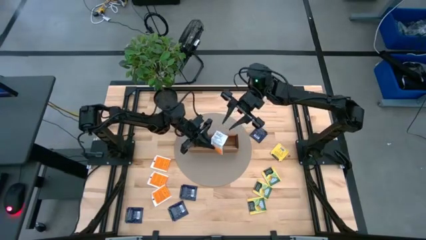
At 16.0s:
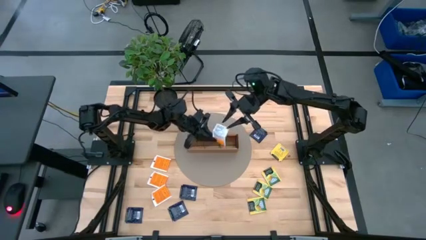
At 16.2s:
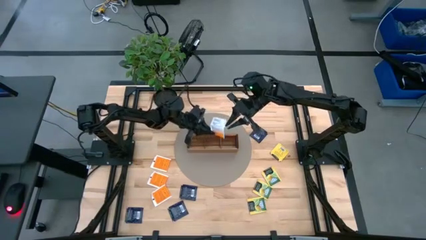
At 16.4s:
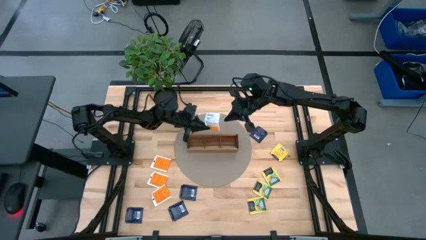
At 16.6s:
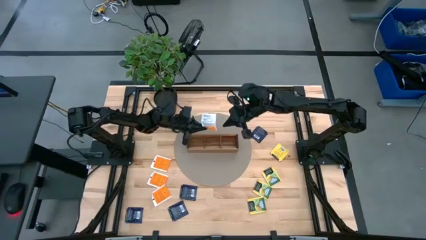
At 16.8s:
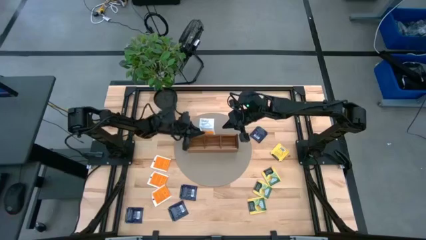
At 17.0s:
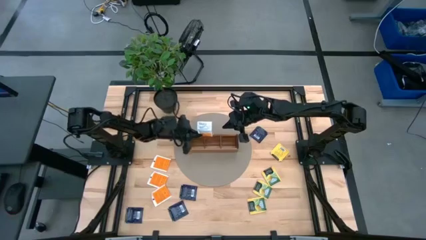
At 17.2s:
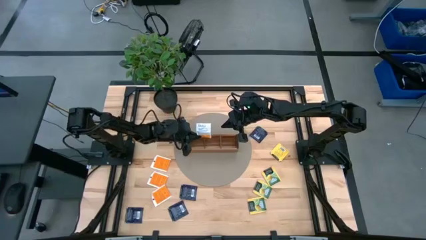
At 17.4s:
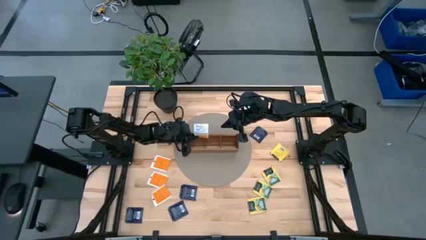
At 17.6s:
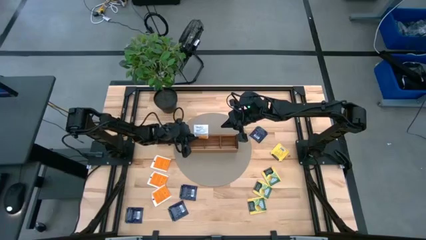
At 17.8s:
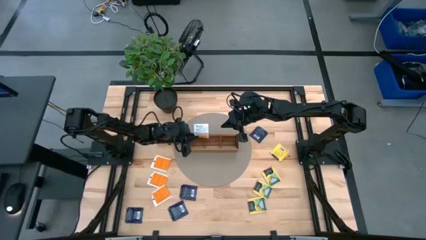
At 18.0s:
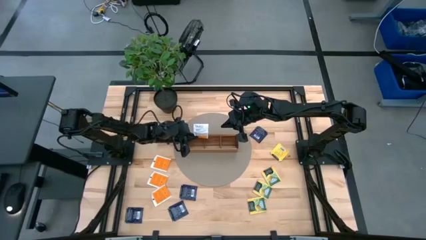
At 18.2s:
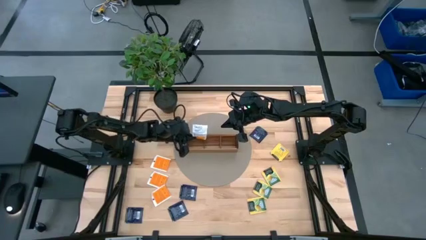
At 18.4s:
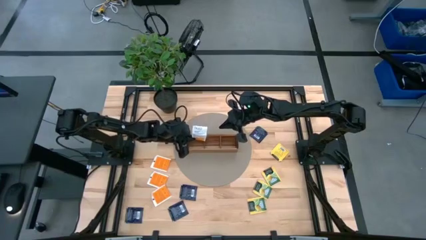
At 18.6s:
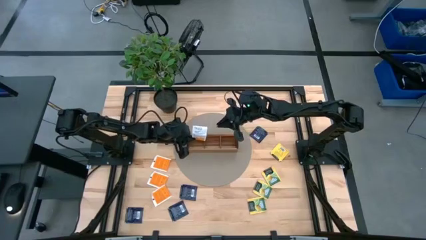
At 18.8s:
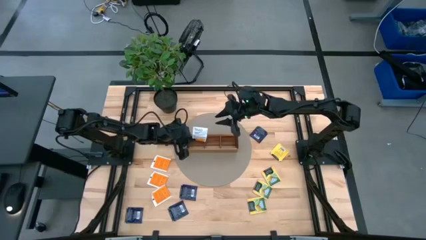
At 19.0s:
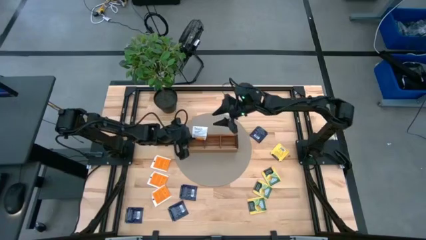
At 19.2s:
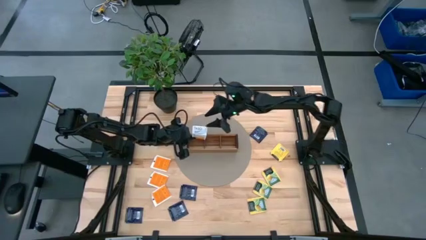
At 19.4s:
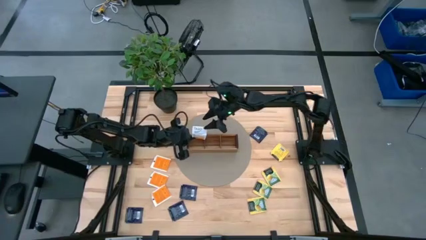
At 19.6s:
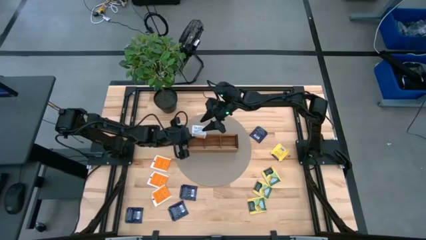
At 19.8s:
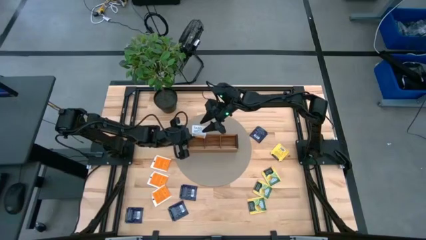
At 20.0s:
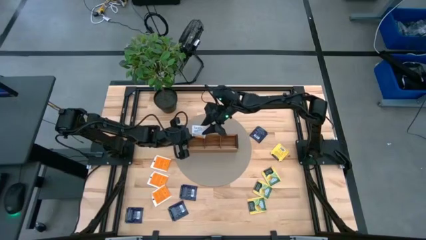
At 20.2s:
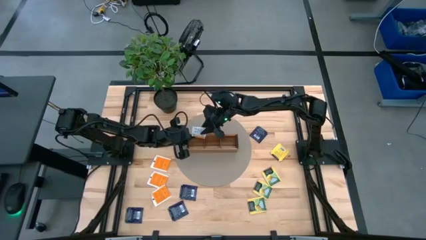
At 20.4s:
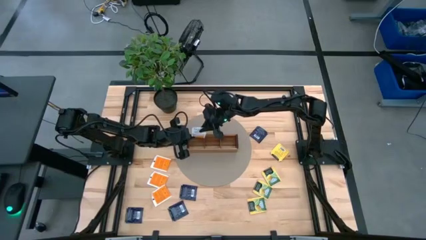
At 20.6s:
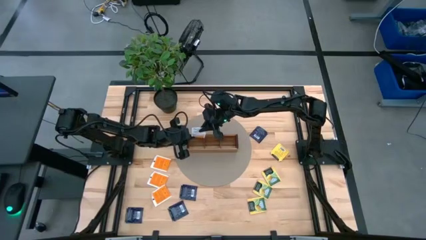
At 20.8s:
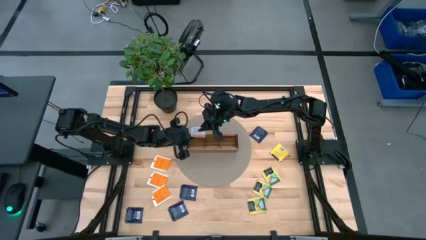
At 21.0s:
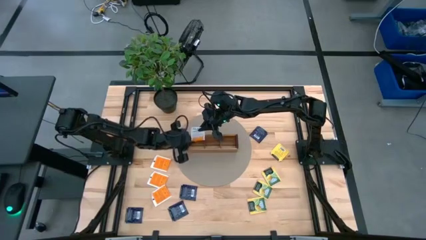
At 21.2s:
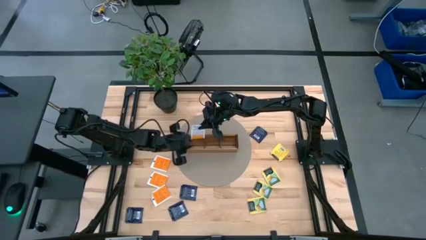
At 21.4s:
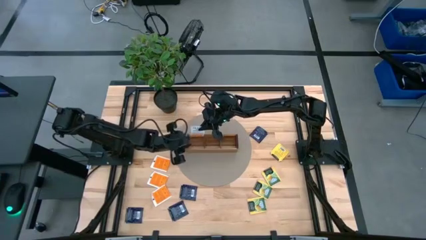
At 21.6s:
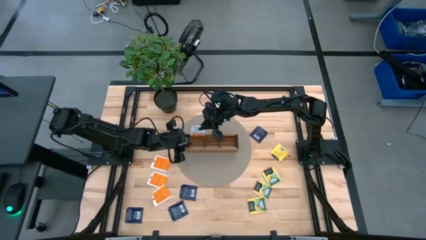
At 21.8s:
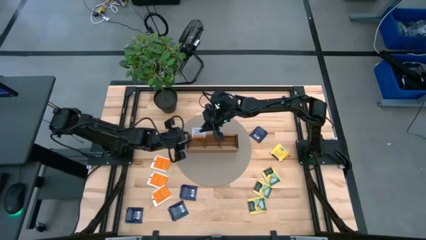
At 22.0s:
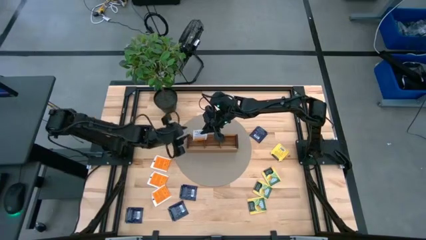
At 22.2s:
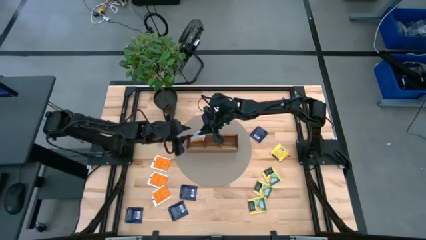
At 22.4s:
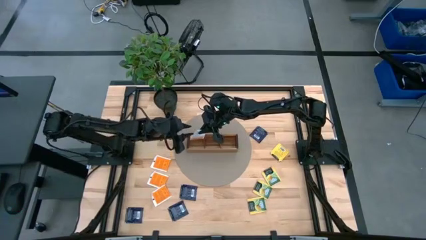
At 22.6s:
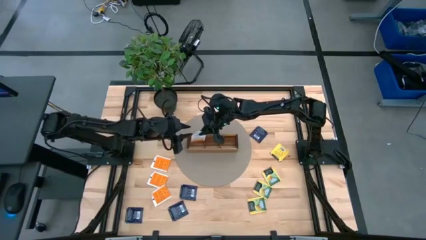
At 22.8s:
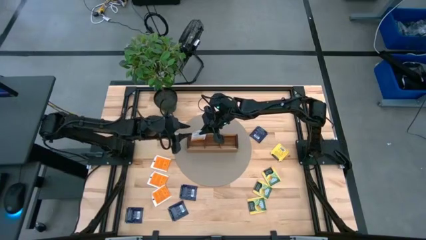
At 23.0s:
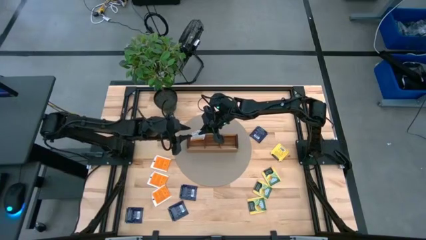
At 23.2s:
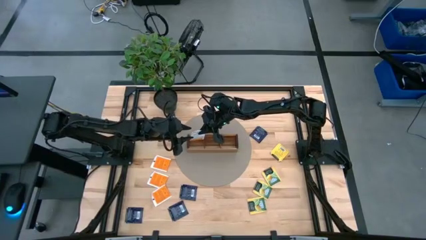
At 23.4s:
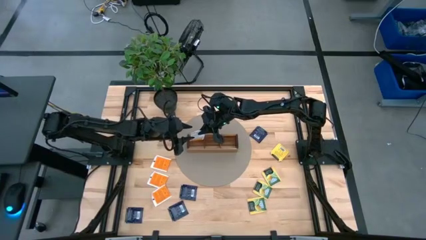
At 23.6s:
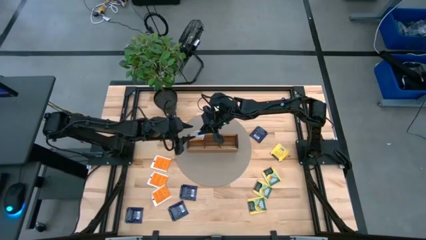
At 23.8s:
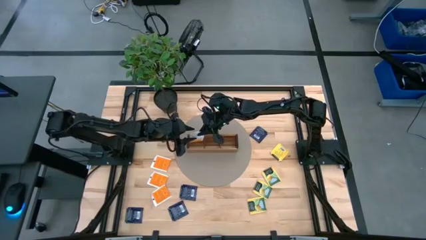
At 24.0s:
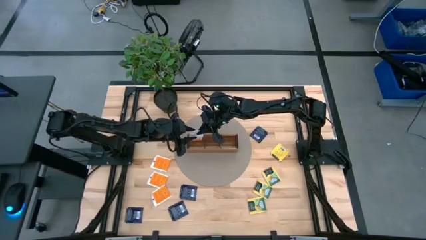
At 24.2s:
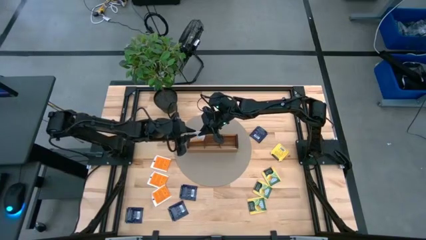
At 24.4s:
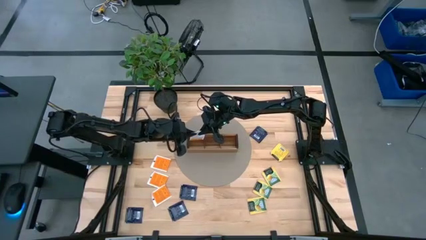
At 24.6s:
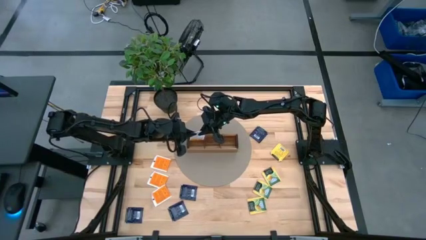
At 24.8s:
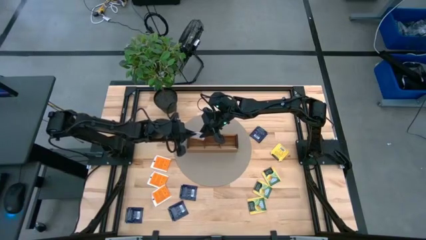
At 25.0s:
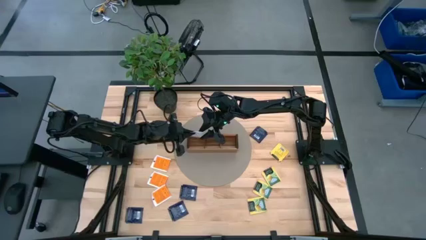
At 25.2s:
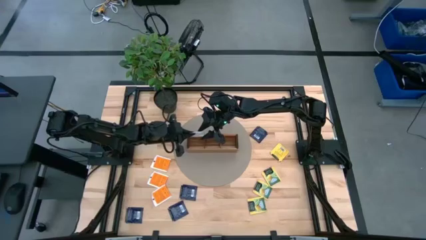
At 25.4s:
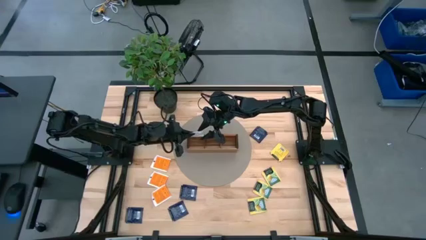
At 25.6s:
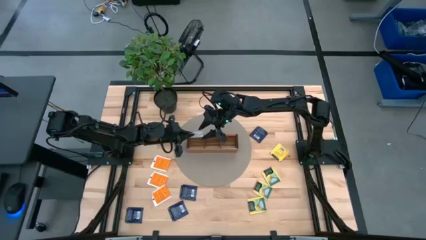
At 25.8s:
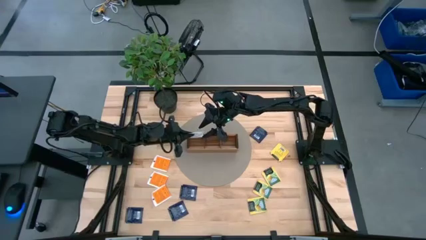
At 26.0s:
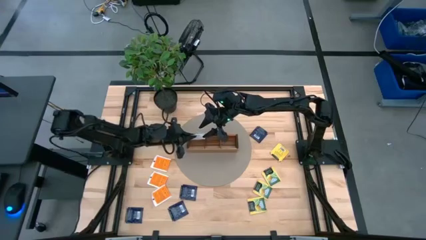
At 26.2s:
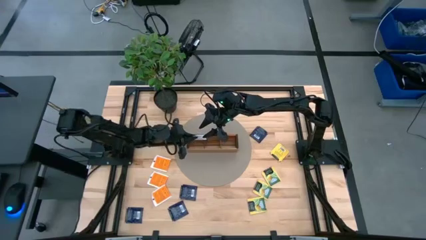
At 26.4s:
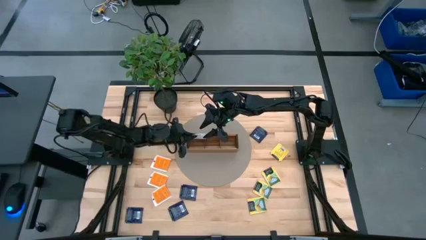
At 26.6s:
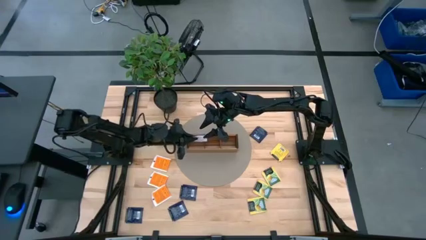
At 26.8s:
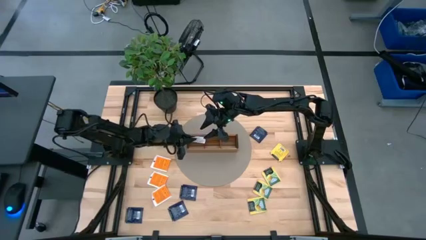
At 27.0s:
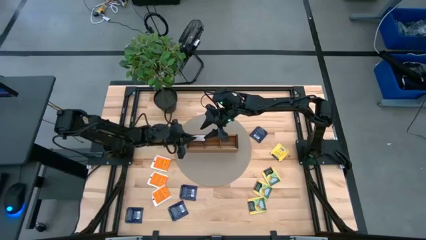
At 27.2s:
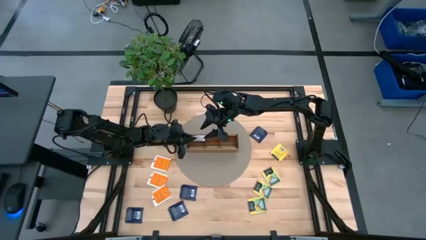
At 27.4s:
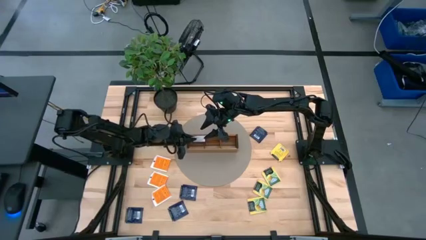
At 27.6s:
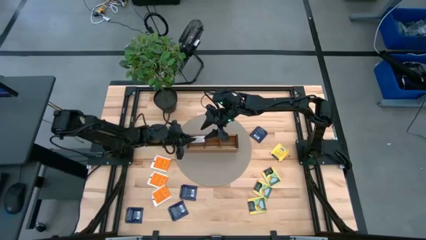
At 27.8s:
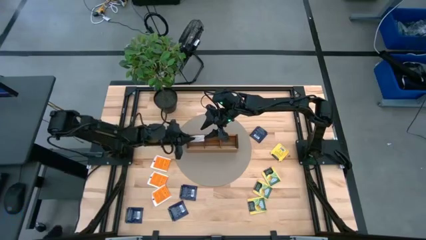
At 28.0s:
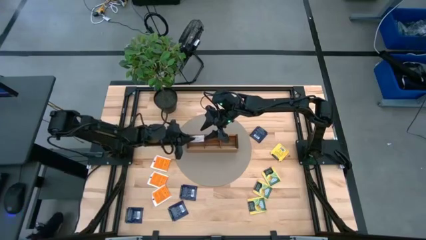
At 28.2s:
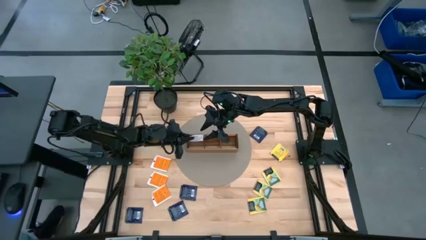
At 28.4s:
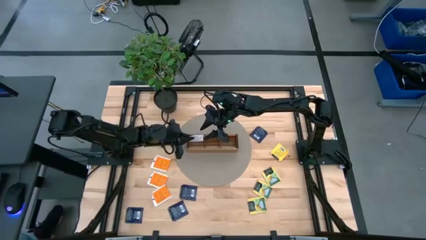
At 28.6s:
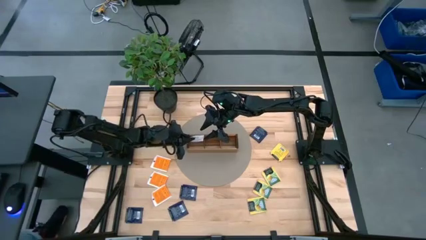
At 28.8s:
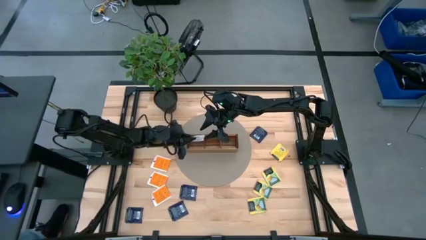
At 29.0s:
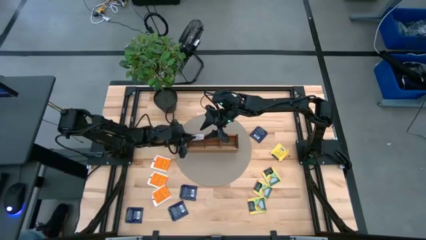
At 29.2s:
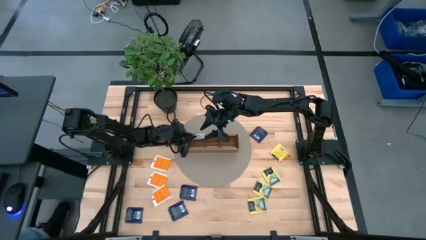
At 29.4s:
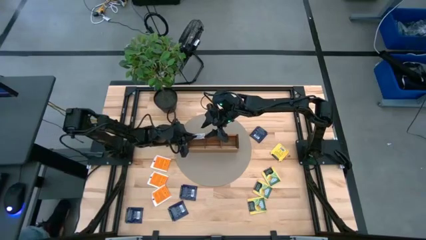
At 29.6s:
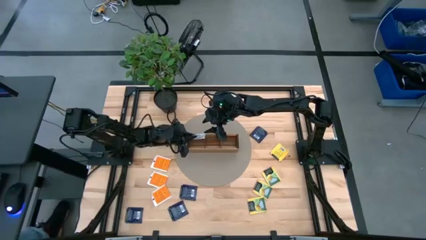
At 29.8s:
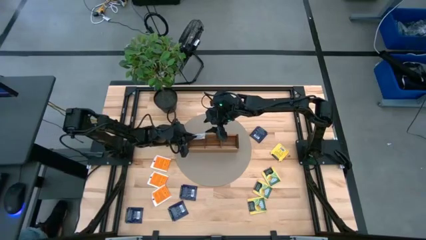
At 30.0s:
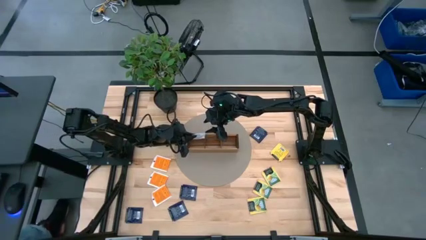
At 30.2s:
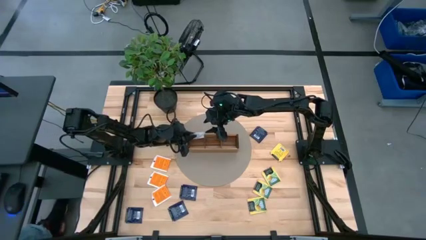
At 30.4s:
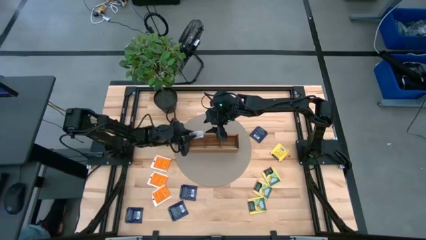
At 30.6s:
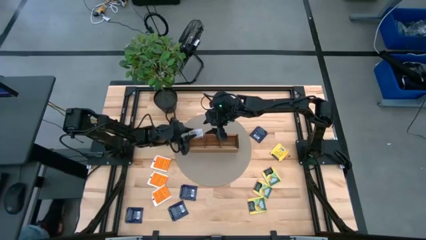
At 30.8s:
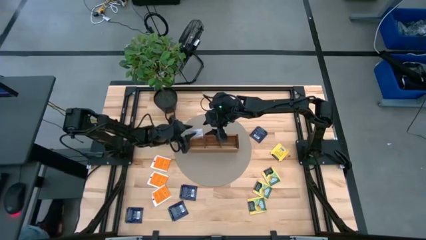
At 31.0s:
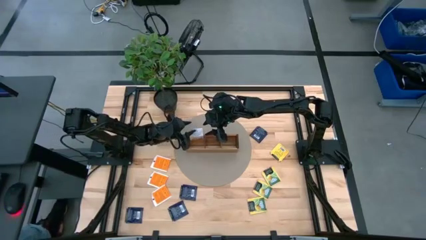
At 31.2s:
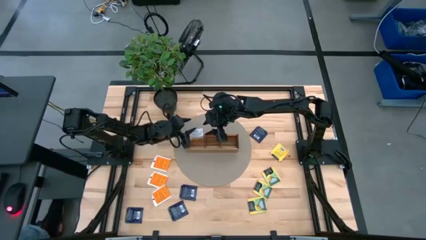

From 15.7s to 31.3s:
Task: Pick & Place Tea
Put the orange tea bag into the left section of the wooden organizer
